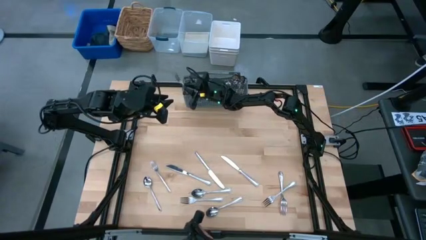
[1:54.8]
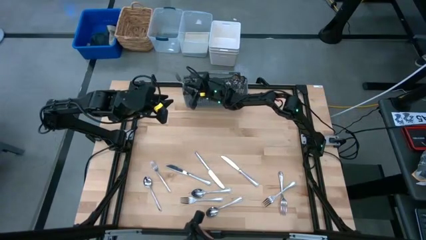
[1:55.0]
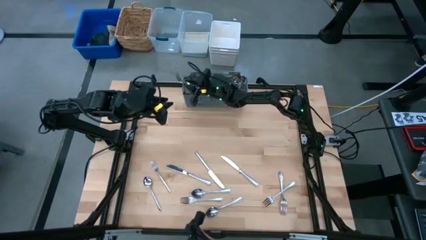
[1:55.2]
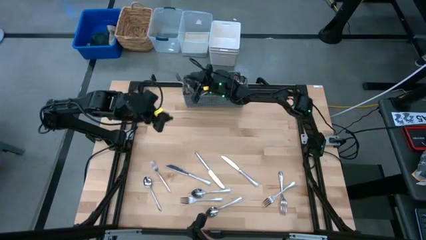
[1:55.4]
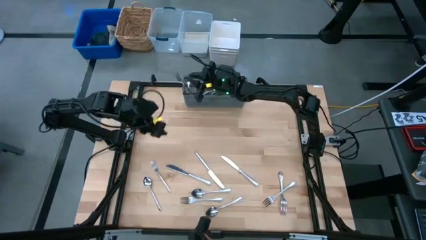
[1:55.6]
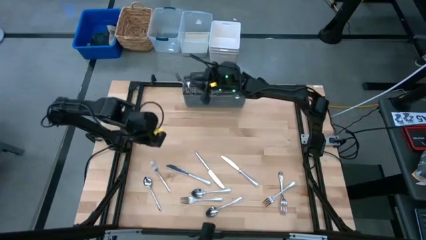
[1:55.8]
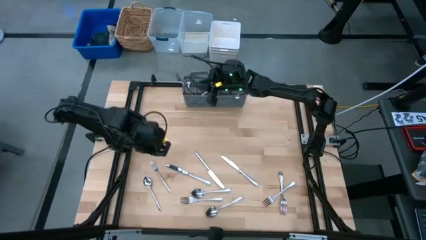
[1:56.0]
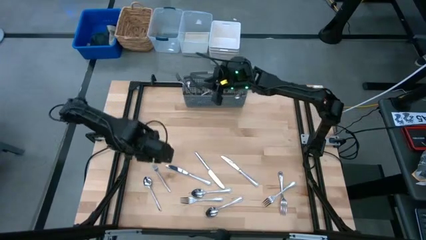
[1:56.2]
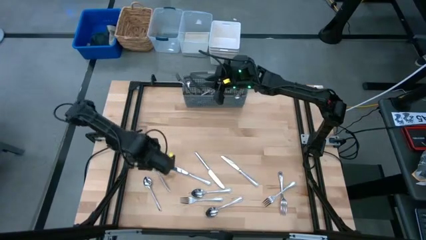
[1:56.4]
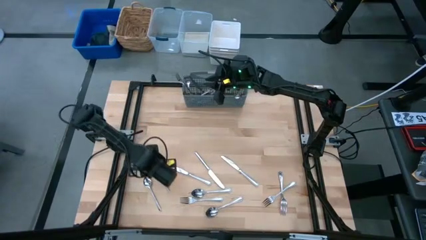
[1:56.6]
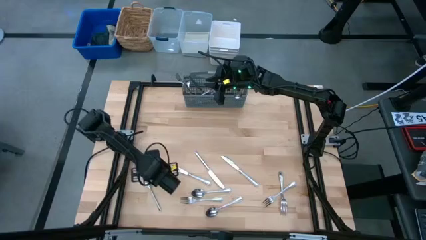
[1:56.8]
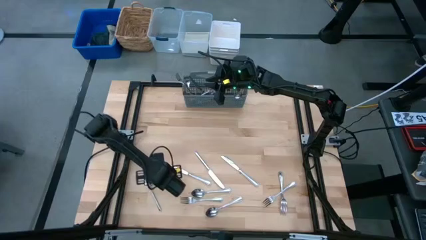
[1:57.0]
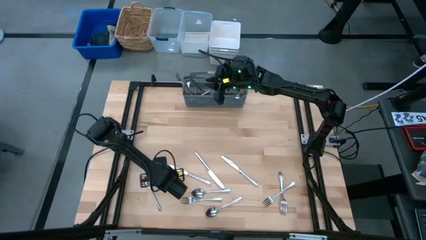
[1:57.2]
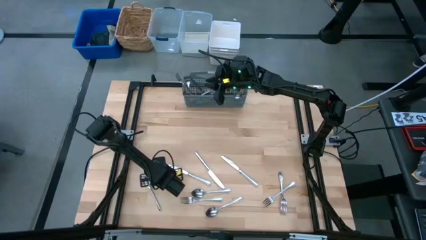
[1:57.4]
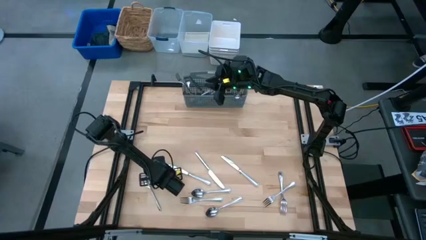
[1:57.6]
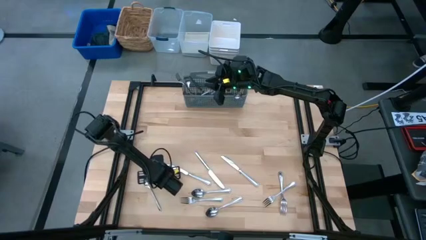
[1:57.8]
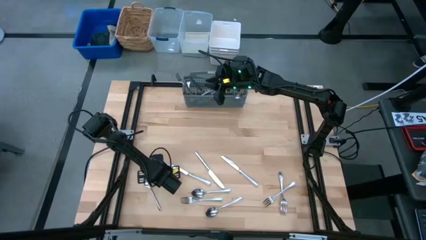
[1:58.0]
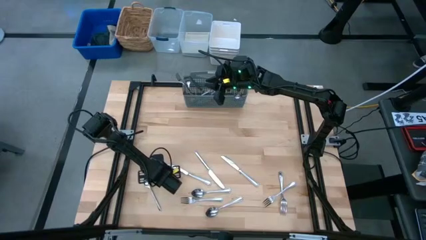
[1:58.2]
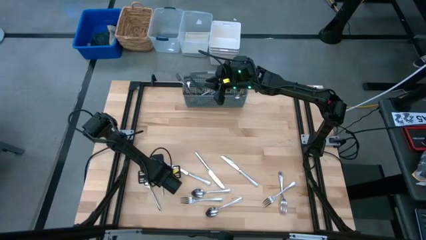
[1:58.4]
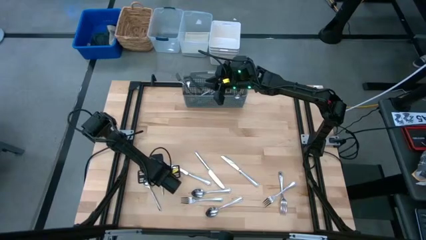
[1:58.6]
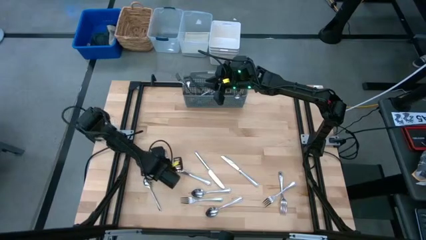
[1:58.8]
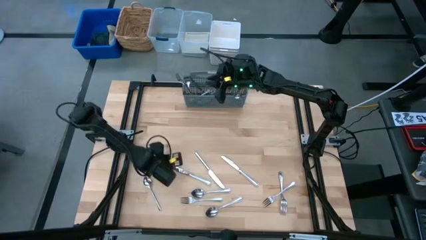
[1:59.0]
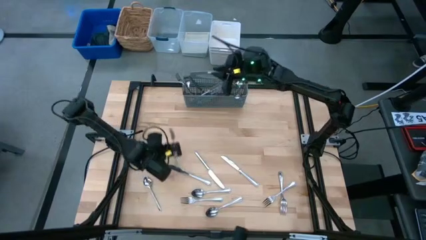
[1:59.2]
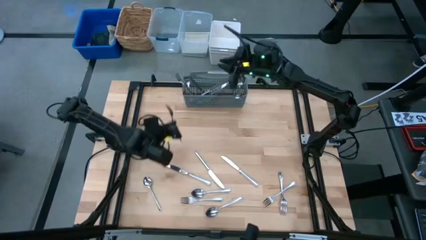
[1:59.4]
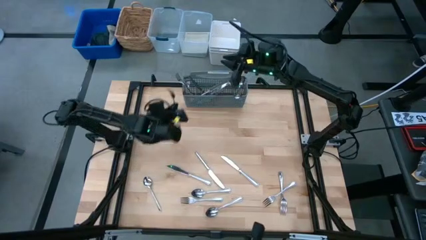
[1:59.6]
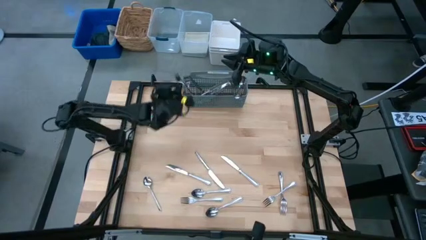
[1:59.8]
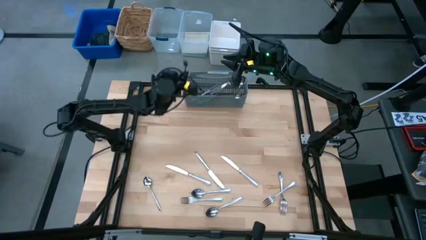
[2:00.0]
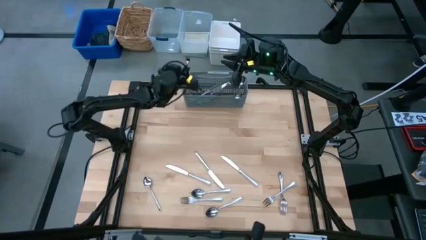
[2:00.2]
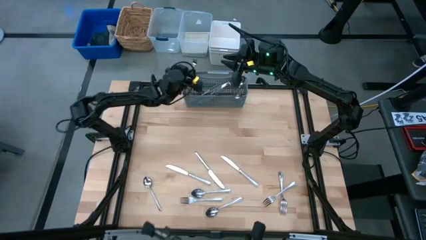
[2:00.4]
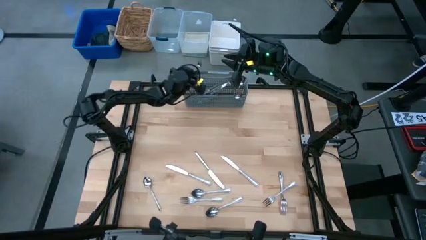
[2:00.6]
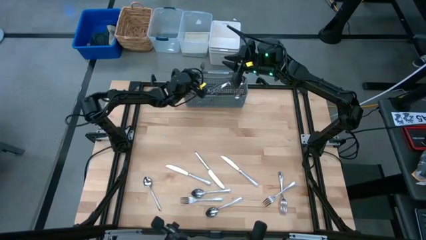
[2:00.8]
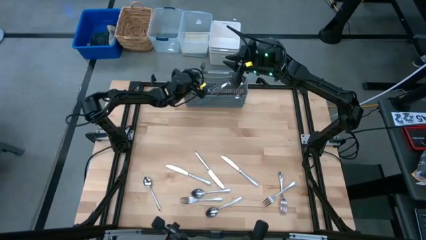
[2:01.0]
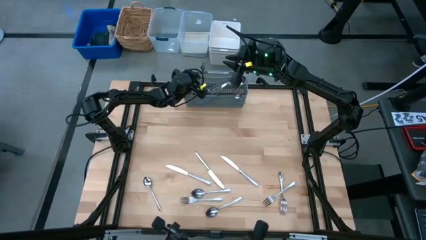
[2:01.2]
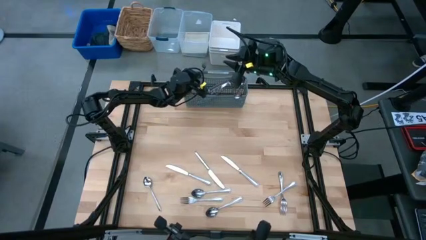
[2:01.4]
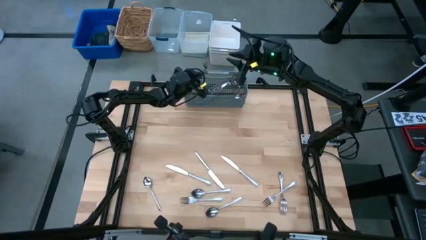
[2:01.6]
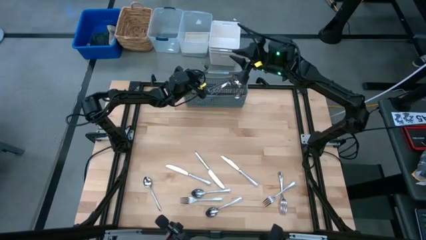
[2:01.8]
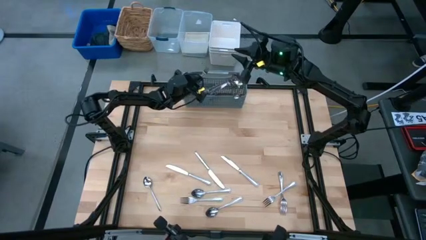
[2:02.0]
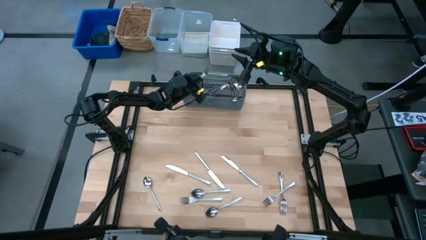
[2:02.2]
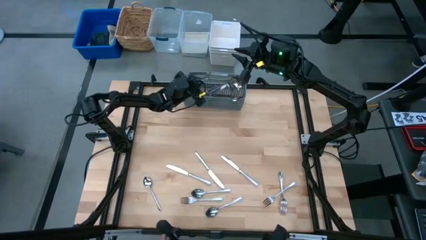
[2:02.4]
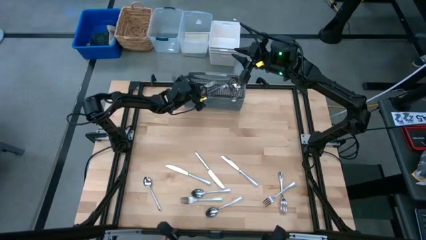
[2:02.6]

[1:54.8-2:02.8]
Put the silver fork into the dishwasher utensil holder

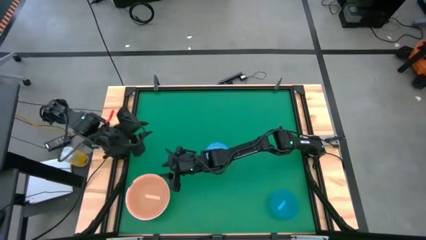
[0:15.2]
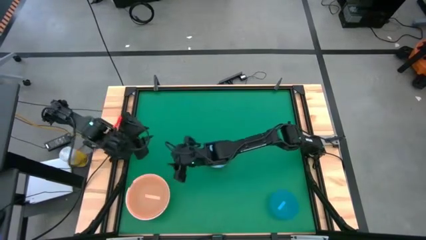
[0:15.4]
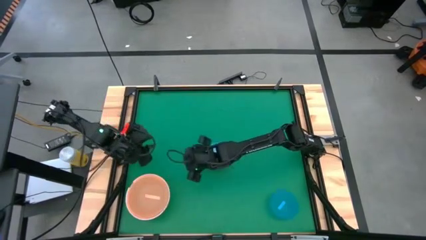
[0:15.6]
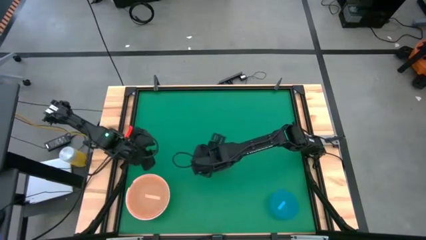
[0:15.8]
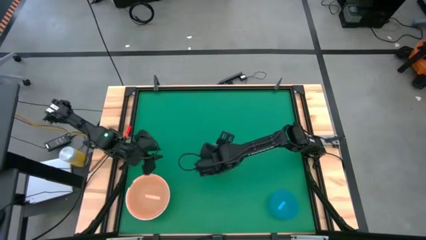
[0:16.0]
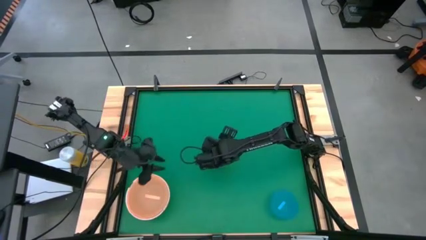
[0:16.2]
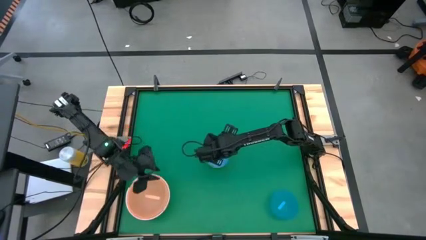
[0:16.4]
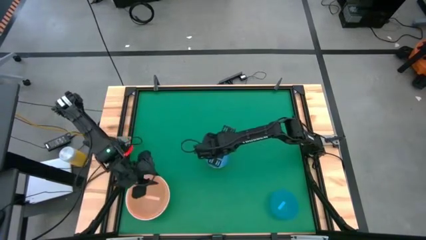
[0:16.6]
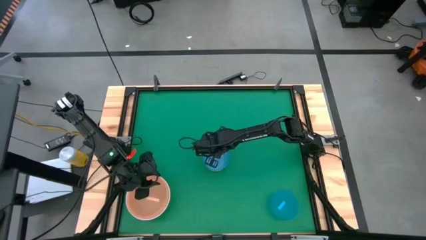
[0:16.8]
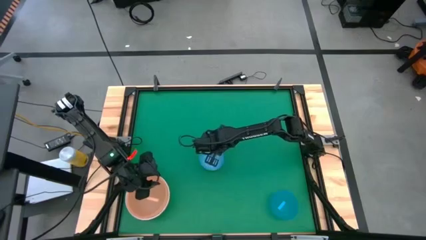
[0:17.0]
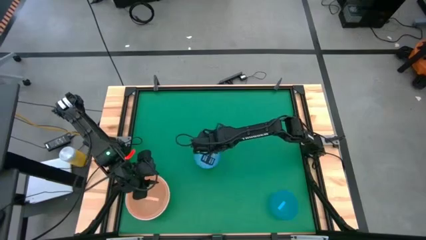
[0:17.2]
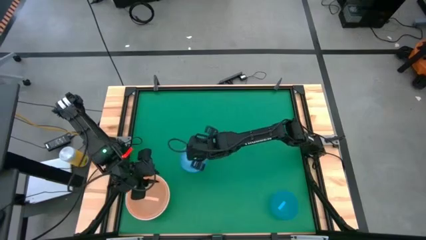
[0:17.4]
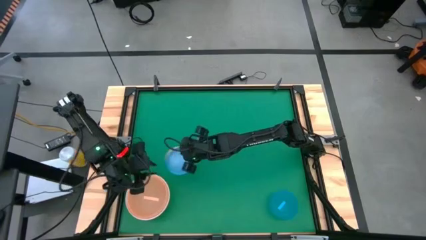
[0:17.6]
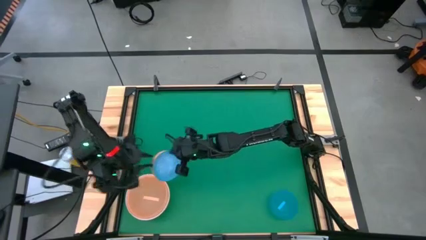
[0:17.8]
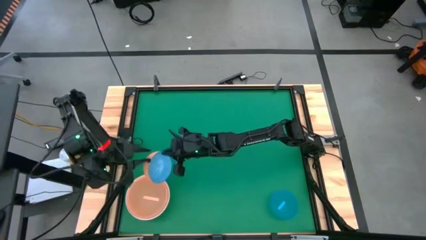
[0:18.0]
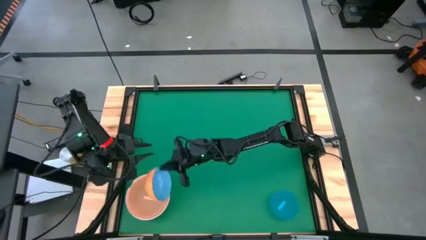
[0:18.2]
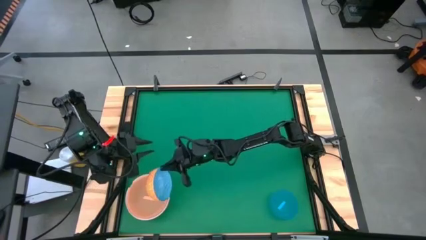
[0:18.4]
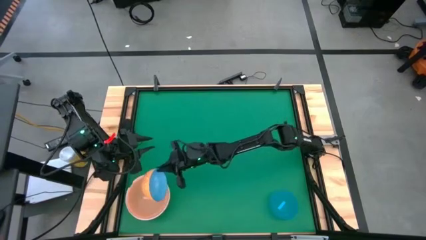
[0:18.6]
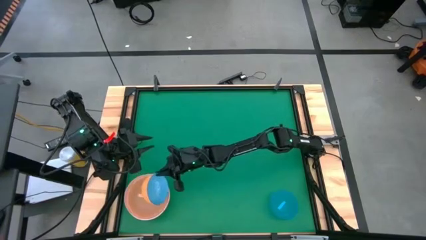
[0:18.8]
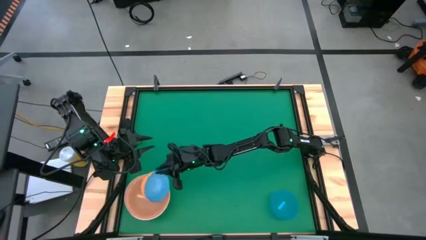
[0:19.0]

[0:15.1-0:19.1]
Stack the blue bowl on top of the orange bowl

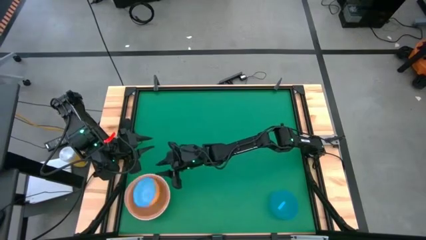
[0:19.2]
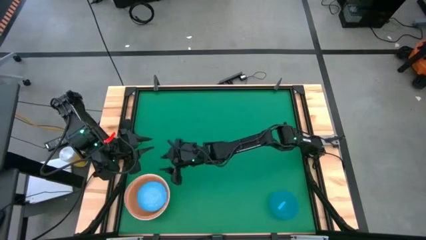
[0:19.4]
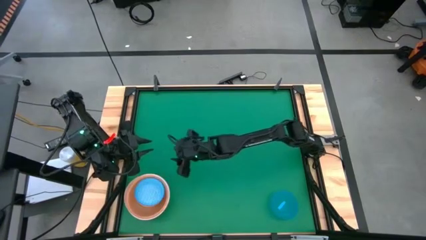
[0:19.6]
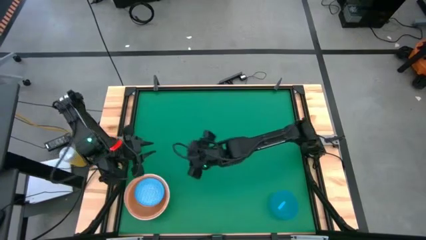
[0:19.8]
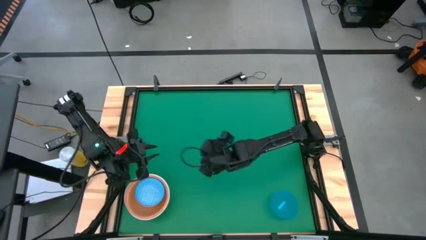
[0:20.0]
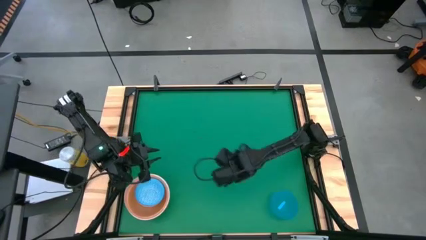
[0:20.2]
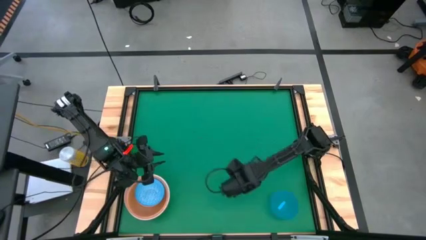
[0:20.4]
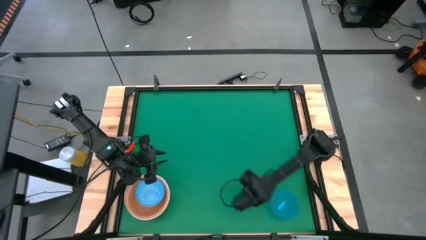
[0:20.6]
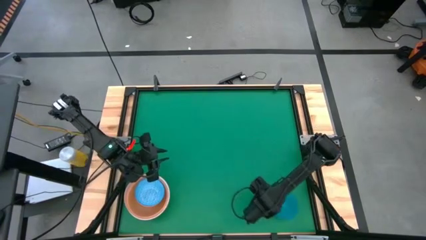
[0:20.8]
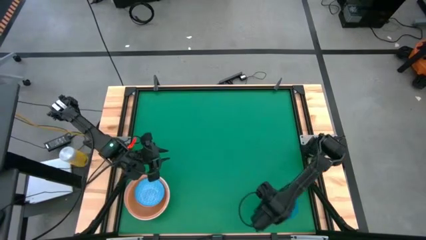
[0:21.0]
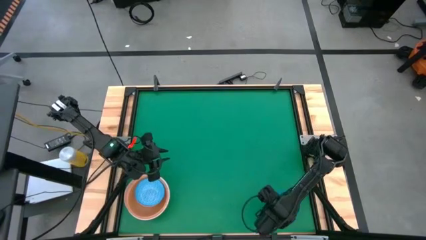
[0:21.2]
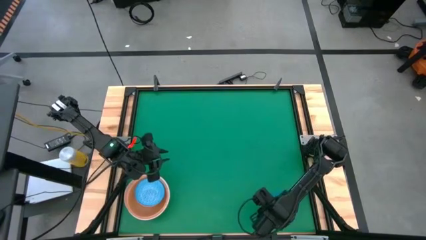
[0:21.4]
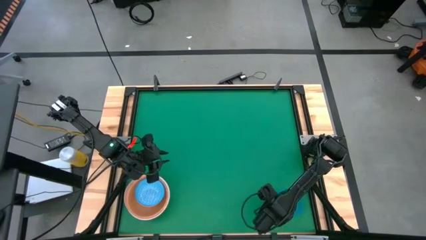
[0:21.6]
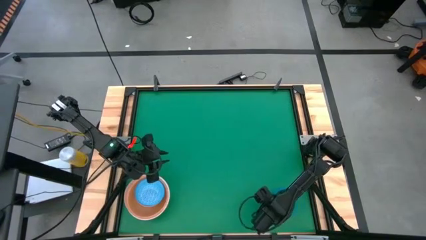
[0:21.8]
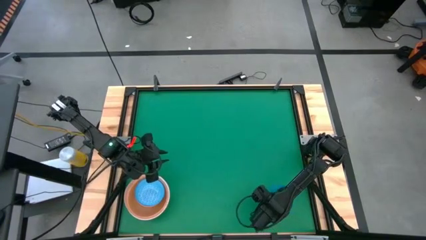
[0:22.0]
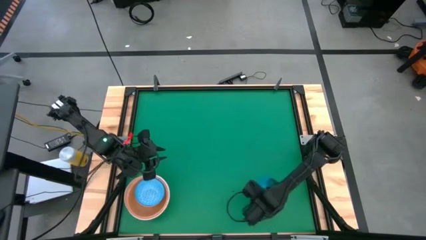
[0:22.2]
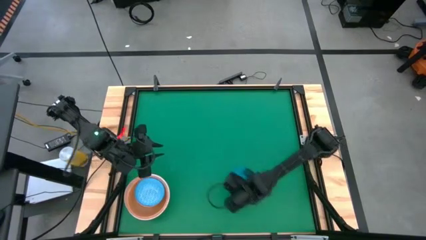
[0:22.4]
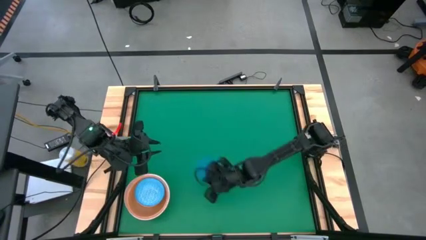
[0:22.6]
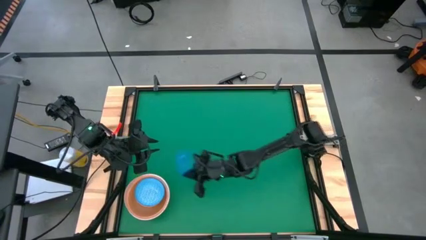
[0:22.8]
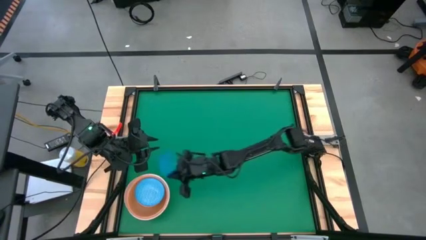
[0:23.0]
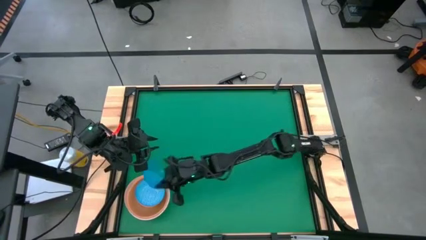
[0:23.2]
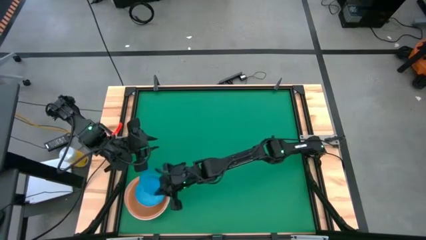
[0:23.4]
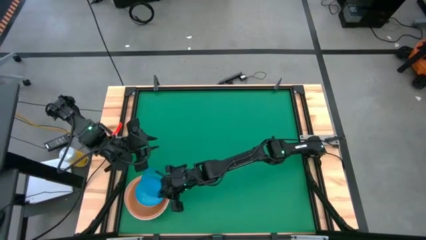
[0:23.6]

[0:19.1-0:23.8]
Stack the light blue bowl on top of the blue bowl
